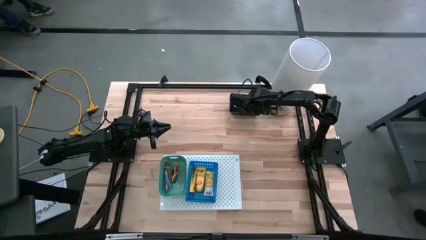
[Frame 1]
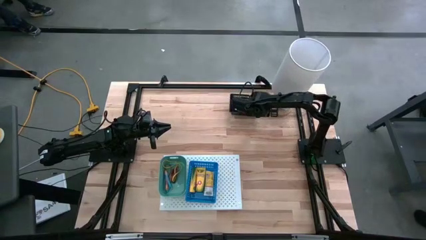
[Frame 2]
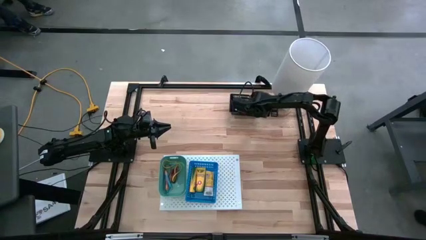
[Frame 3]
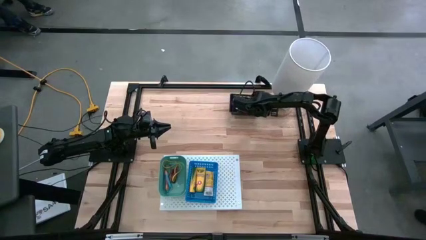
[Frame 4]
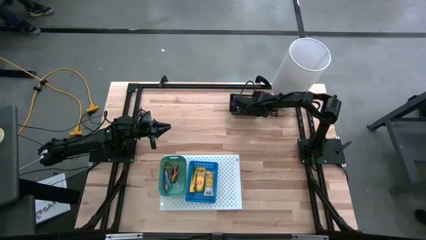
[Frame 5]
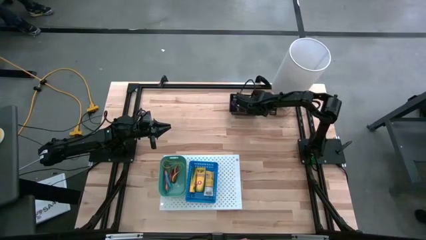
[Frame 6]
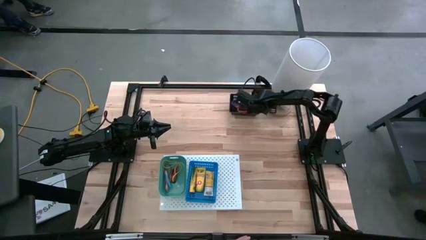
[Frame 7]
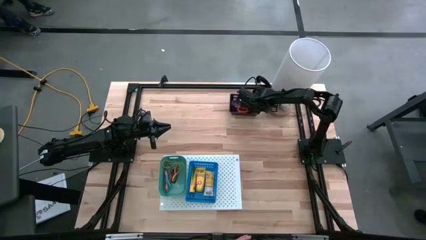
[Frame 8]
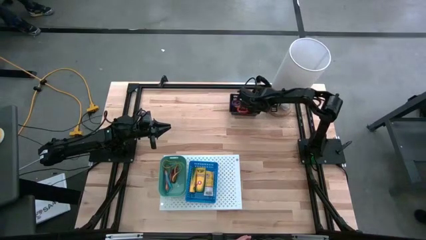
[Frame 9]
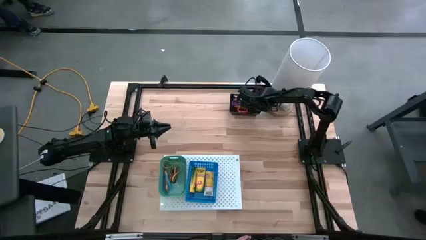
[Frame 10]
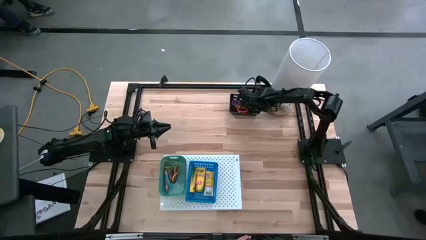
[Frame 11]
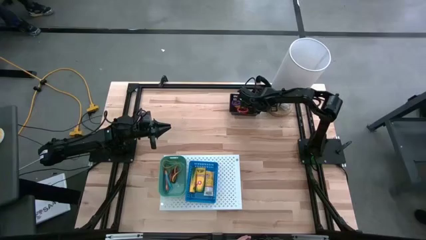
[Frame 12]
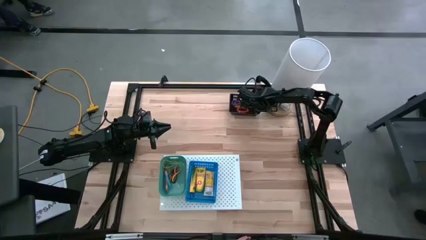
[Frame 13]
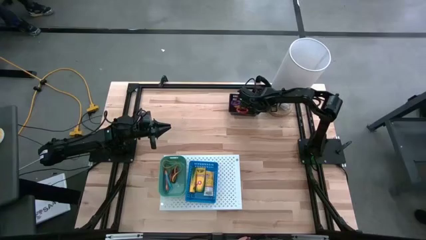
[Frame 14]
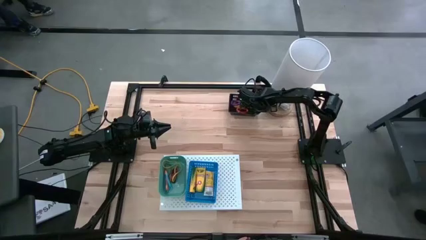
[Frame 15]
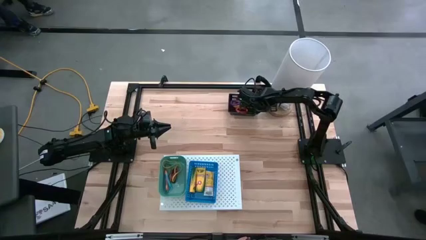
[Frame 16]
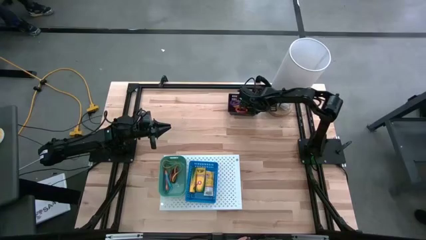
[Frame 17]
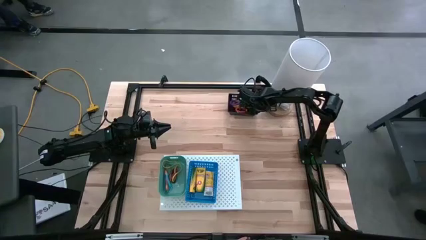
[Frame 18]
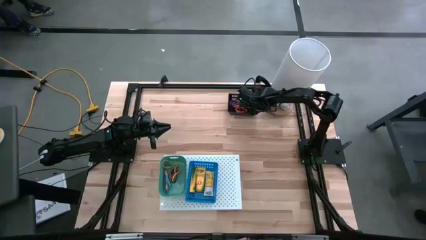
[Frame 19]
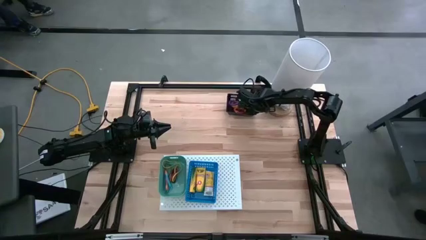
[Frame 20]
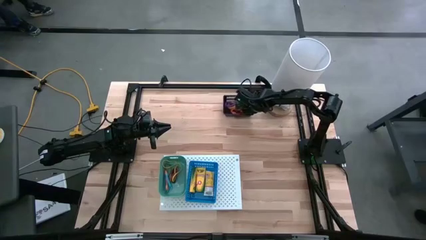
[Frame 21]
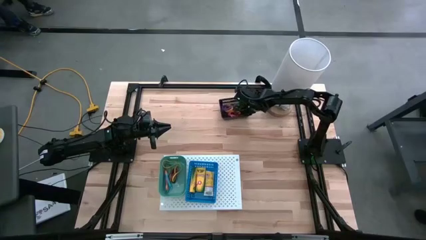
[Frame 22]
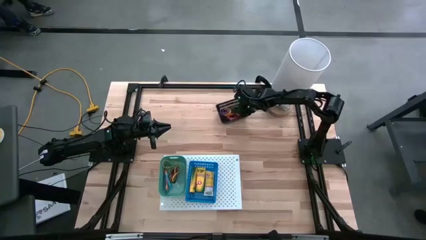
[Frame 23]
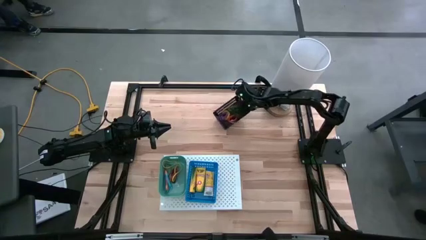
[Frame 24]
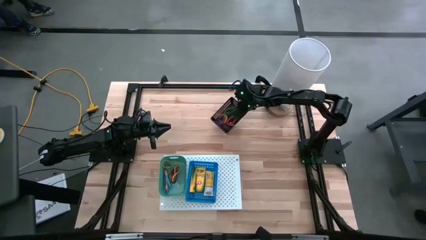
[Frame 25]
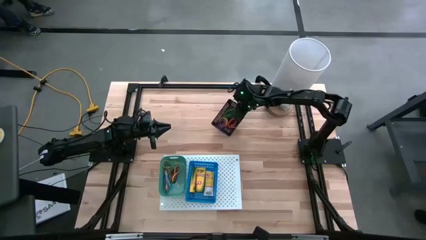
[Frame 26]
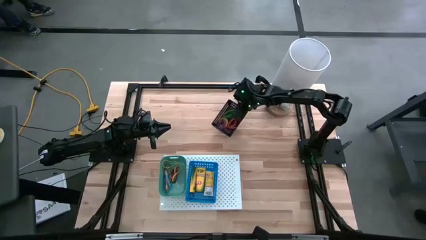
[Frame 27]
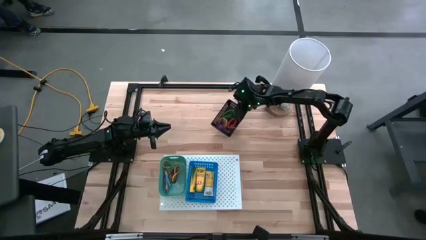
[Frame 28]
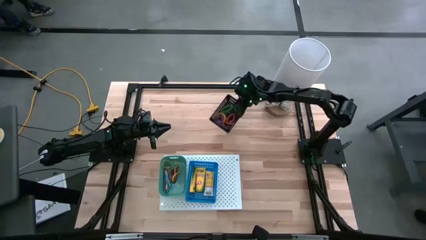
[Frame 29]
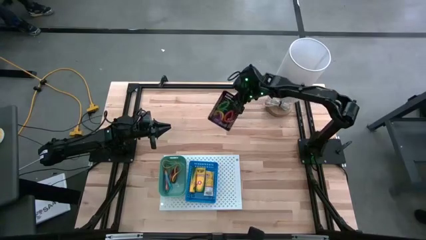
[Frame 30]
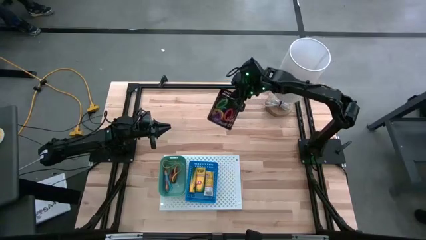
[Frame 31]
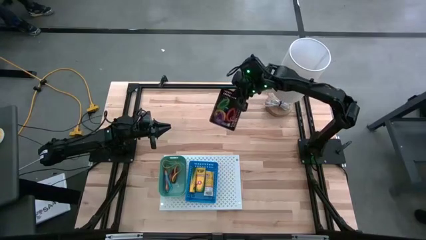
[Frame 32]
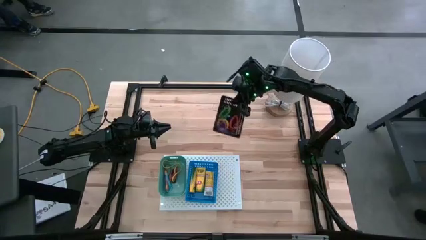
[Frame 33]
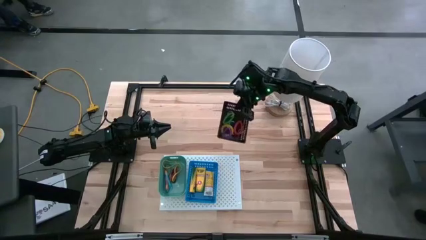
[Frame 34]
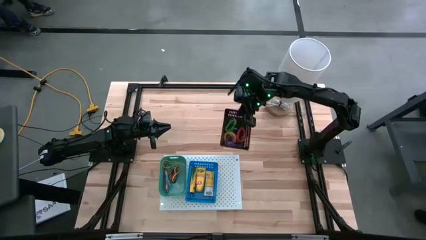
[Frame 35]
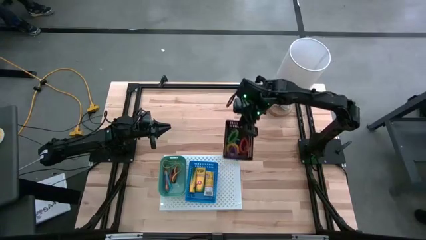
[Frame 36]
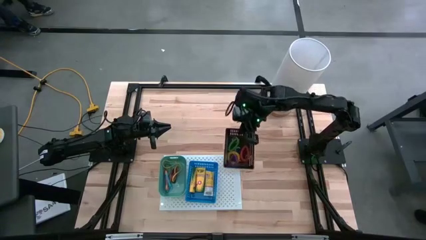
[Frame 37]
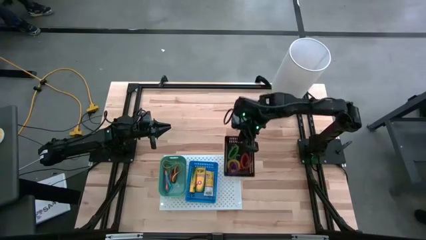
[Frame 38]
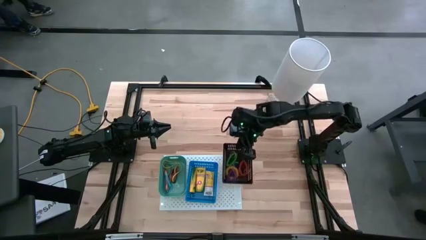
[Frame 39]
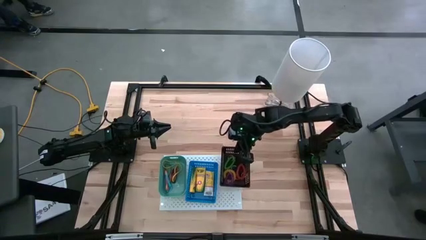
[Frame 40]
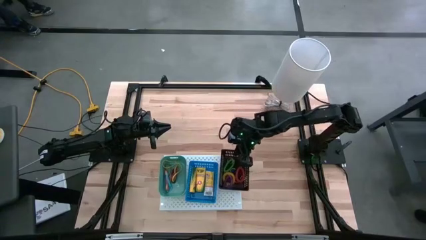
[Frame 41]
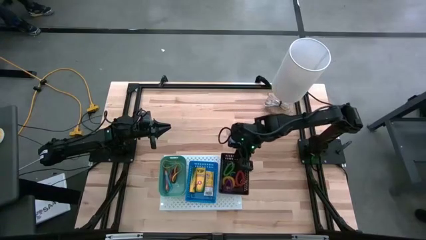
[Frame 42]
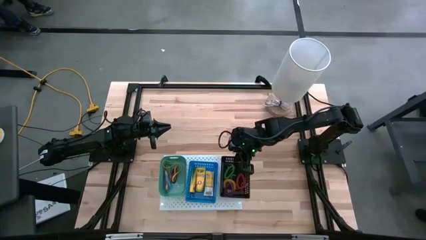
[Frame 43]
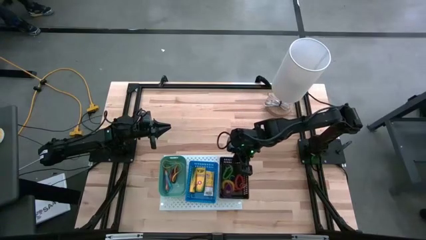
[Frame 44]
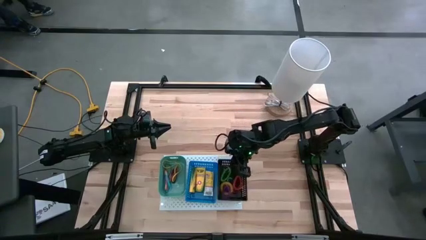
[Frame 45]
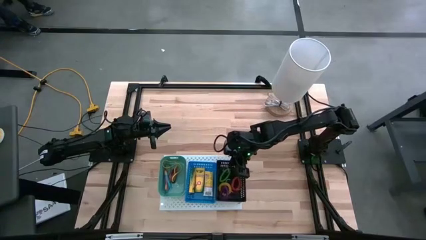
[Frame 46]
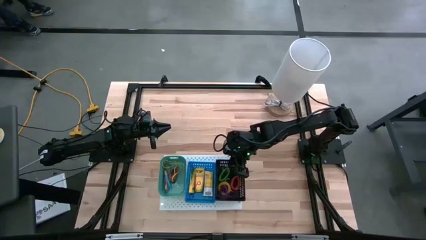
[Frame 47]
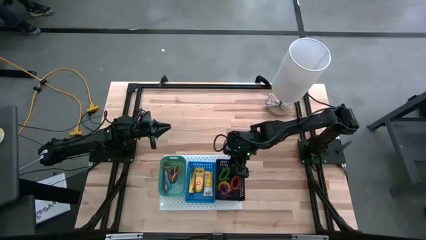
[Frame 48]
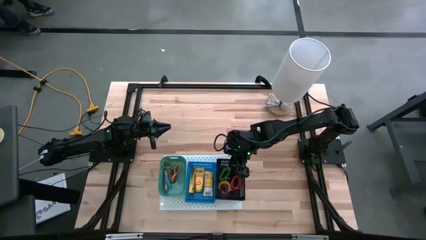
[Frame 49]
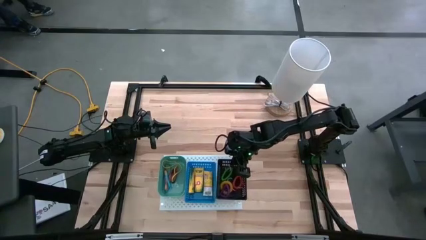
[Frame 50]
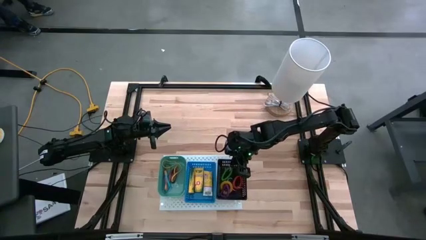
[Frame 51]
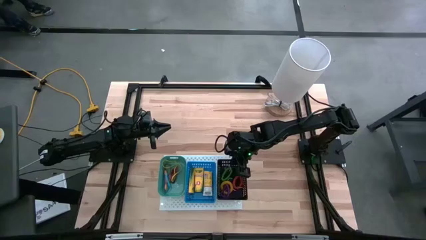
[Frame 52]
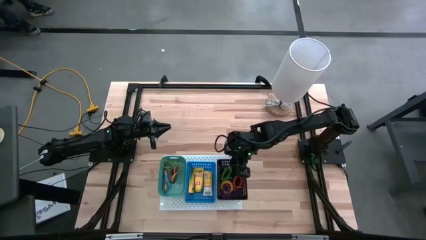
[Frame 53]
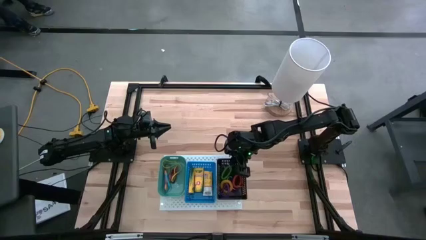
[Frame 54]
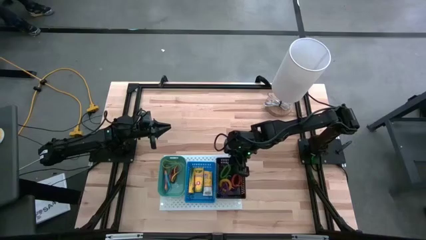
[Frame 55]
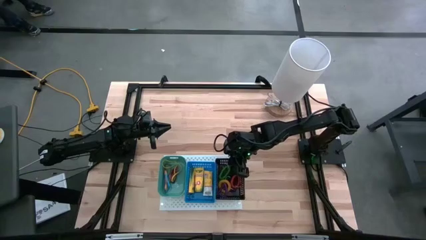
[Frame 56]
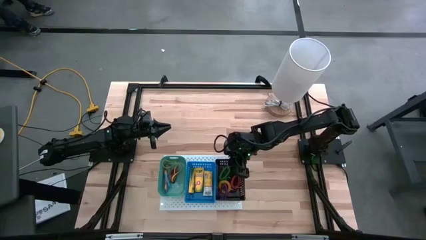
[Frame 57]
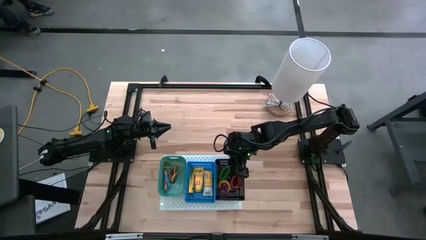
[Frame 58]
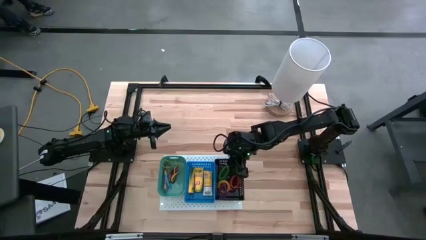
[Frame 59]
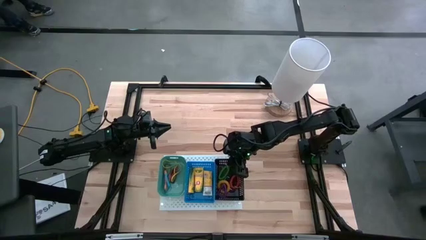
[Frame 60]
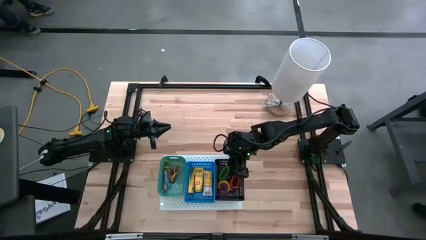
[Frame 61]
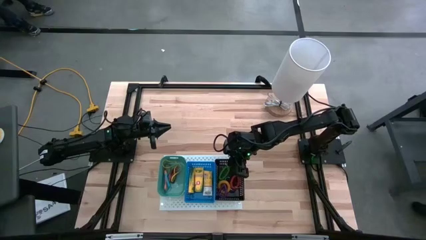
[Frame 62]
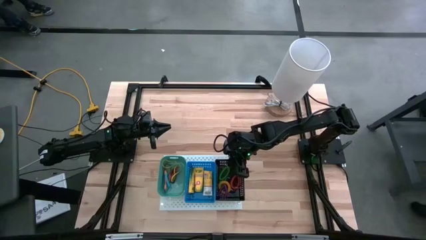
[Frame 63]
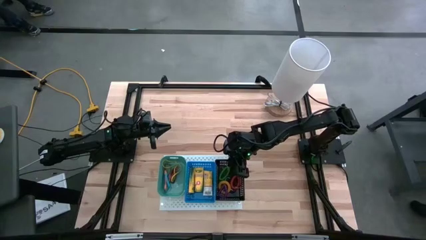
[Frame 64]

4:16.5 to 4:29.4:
Task: Pick & Place Office Desk Supplies
Put the black bin on the shelf
